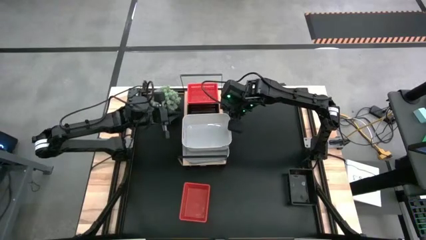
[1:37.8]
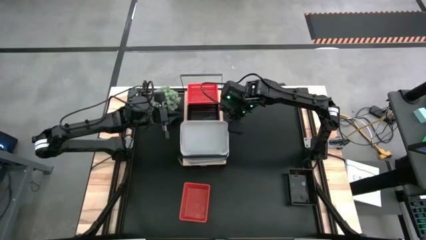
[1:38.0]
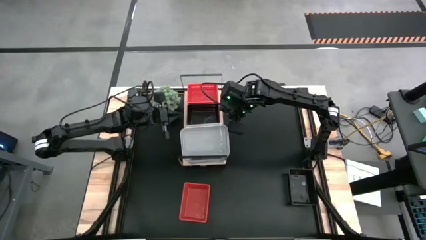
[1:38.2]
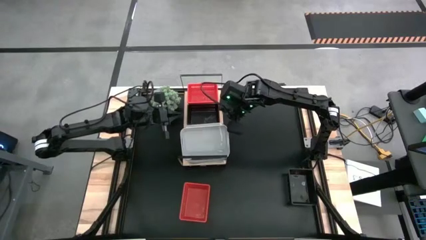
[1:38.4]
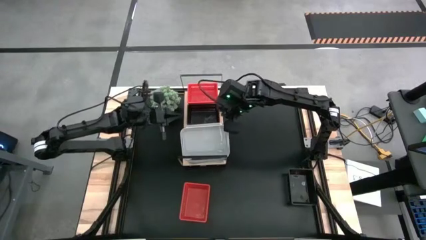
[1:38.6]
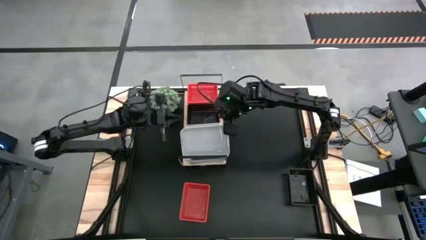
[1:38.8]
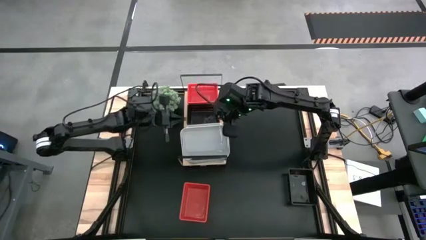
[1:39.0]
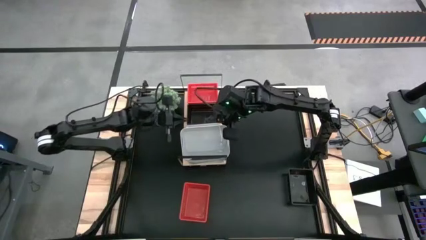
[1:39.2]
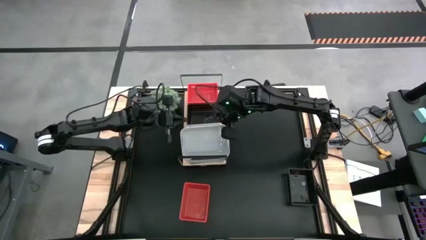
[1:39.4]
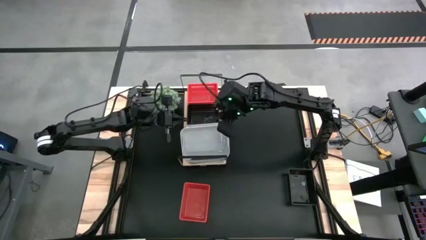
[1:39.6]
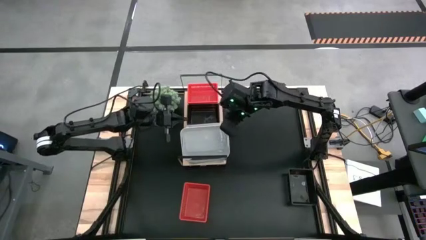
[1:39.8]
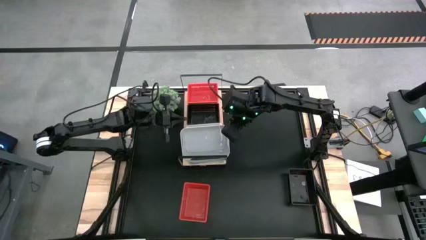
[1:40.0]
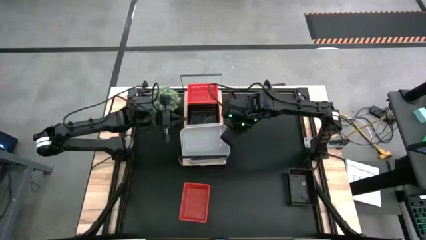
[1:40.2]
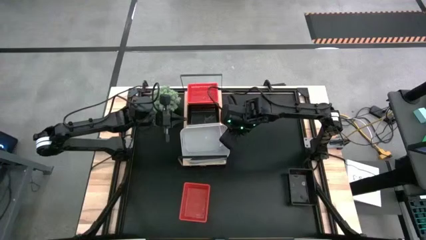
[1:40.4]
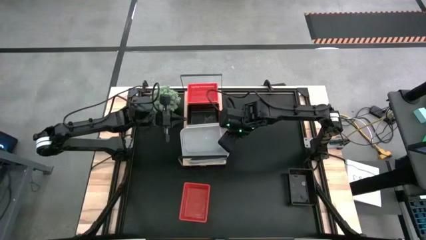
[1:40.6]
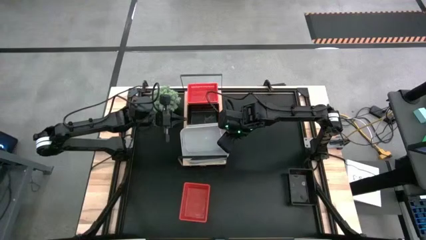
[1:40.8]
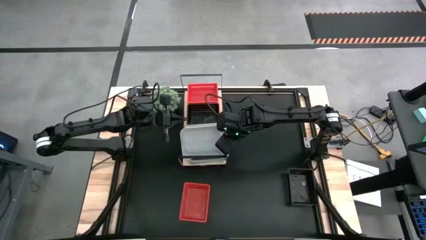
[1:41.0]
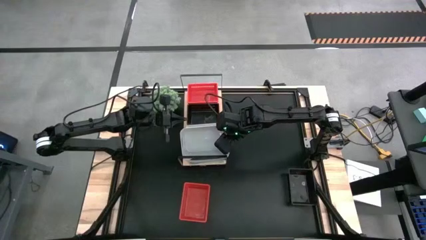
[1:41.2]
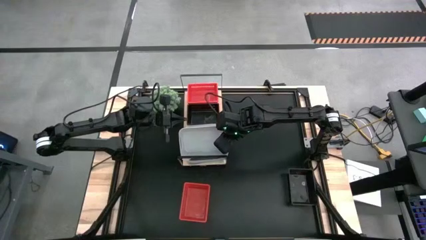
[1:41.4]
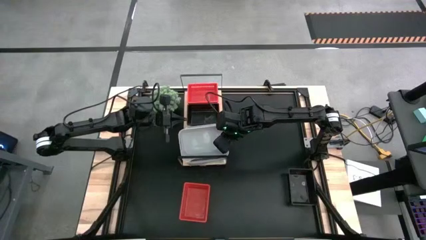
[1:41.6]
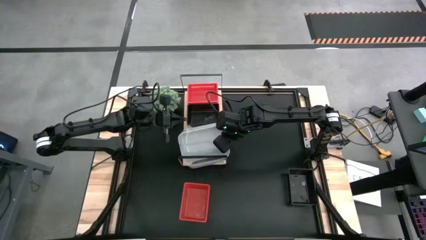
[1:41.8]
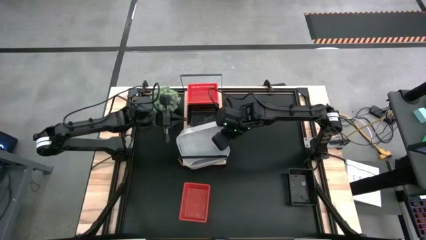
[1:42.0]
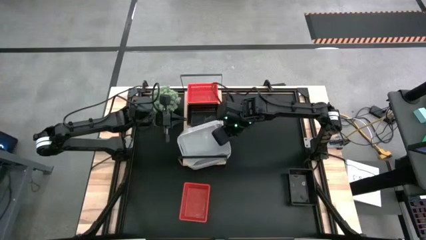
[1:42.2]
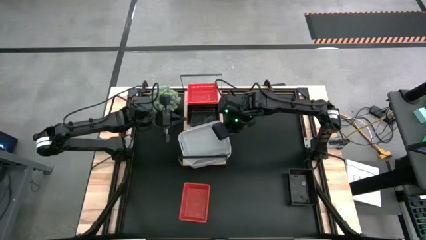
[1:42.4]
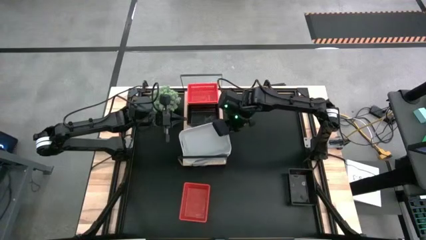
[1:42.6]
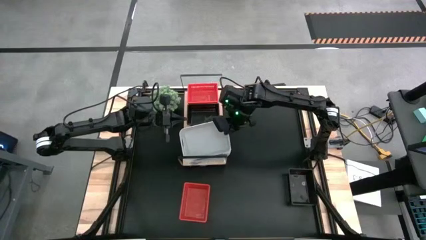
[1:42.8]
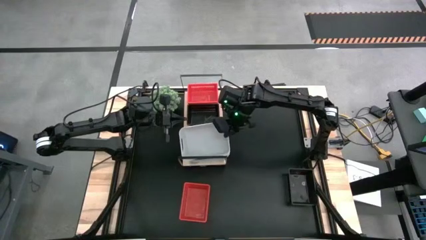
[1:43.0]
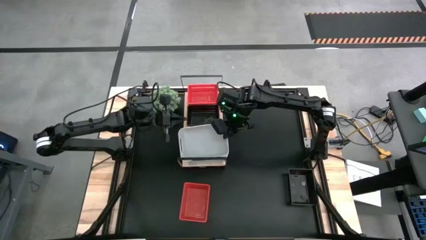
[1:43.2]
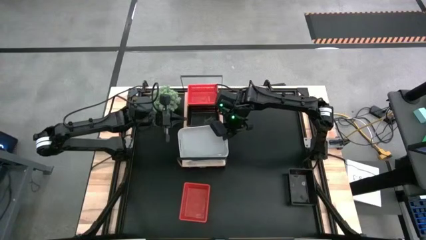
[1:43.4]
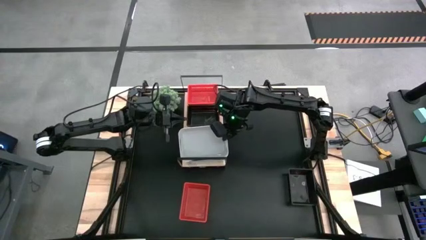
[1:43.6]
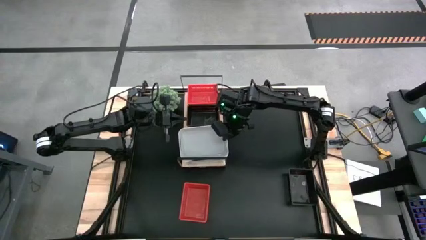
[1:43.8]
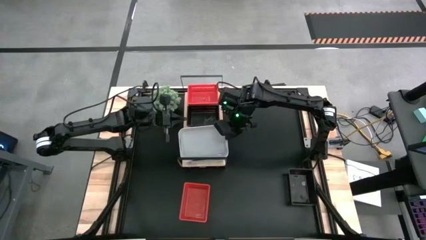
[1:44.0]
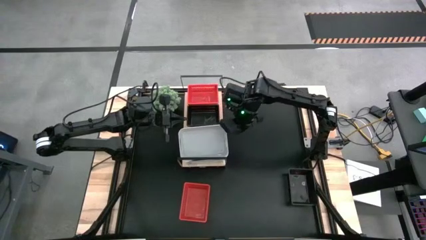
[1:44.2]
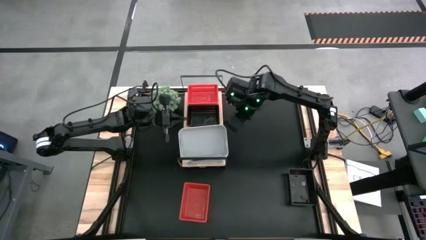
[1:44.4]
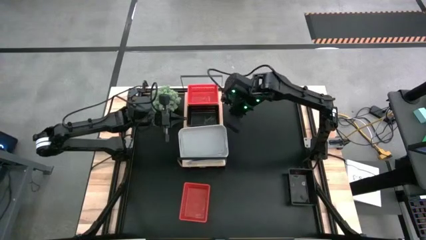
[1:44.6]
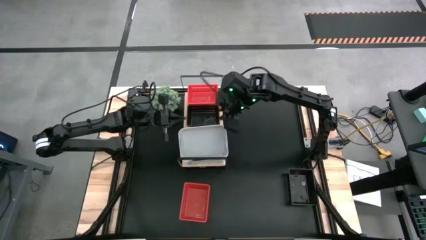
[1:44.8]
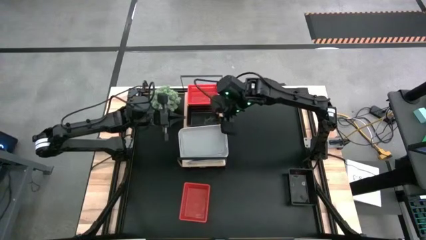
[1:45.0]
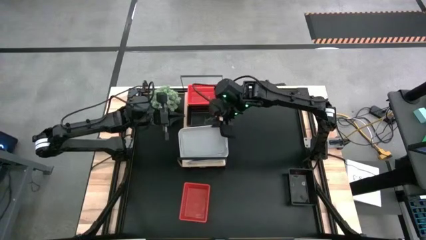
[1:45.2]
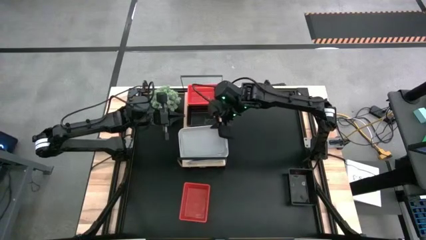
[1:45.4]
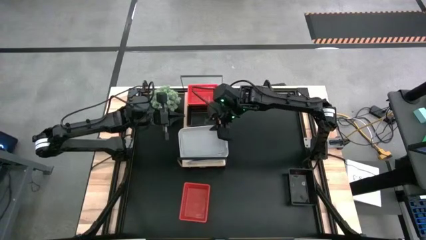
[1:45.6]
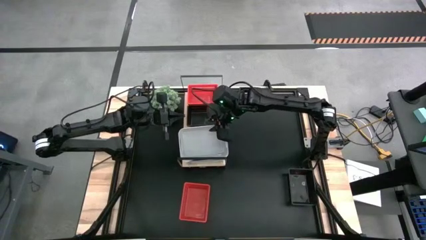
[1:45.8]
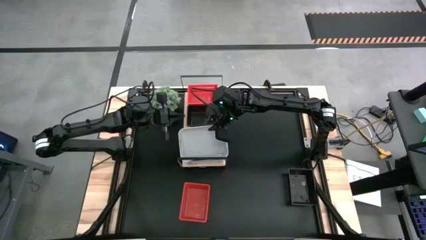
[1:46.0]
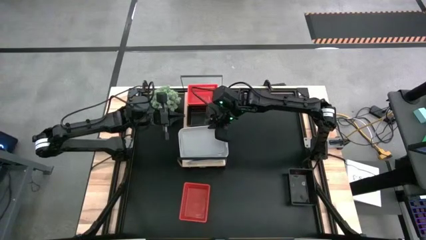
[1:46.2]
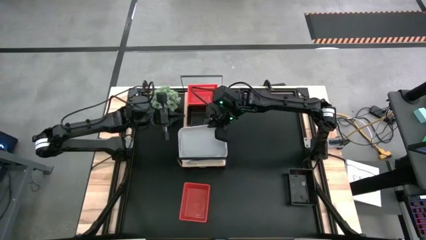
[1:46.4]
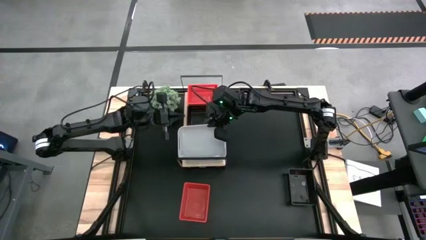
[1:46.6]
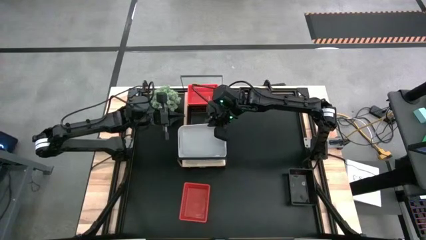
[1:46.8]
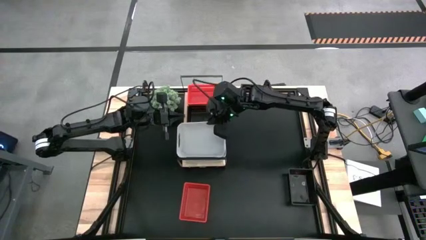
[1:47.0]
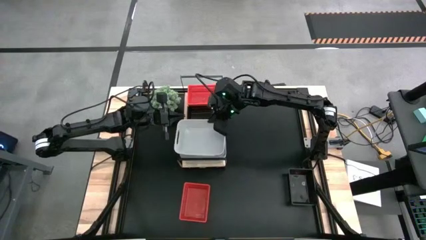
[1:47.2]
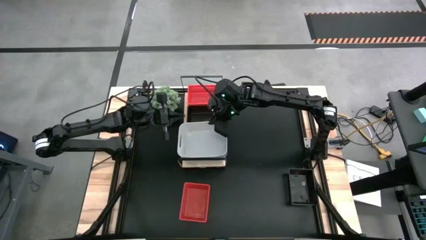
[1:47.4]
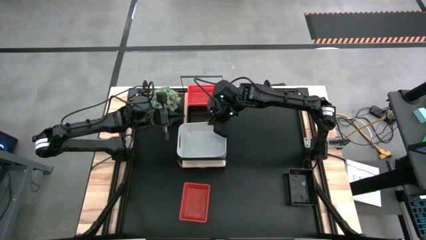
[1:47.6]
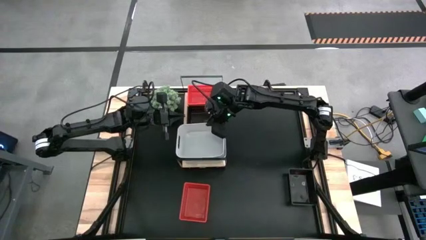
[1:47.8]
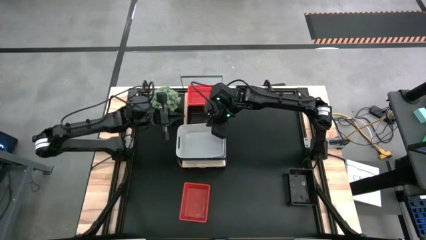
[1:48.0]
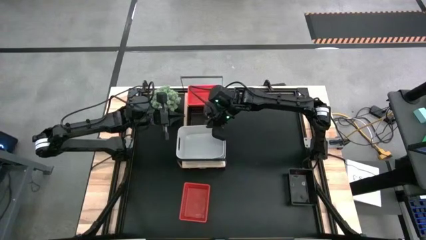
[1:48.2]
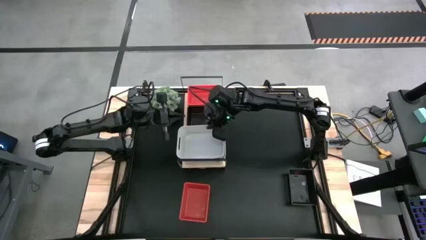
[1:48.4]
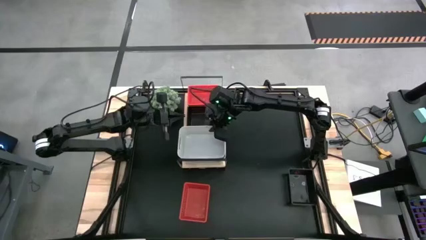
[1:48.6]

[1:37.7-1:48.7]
Task: Stack baskets on shelf by color
Stack the gray bin on top of the gray bin on the shelf

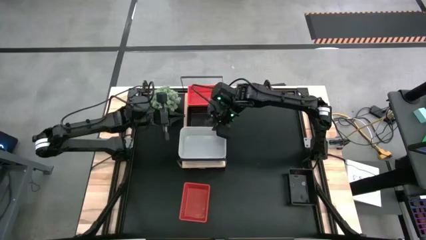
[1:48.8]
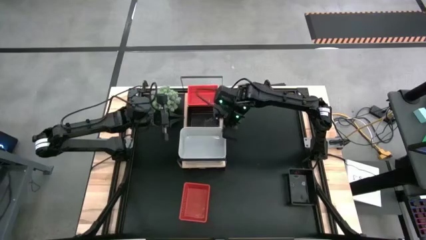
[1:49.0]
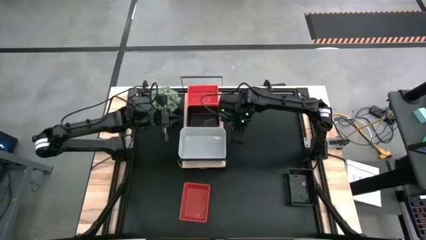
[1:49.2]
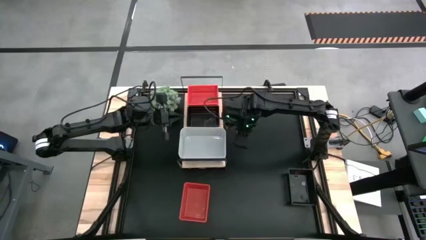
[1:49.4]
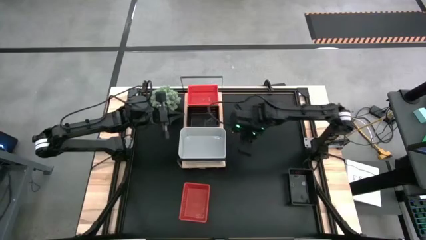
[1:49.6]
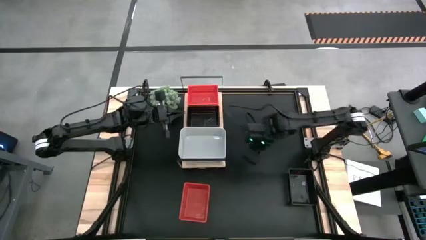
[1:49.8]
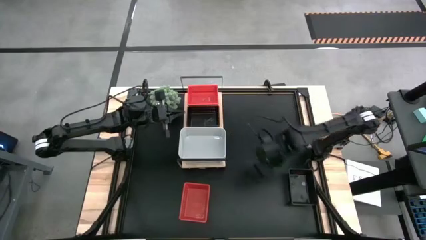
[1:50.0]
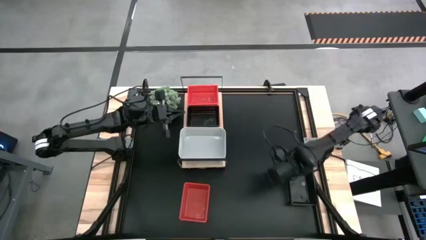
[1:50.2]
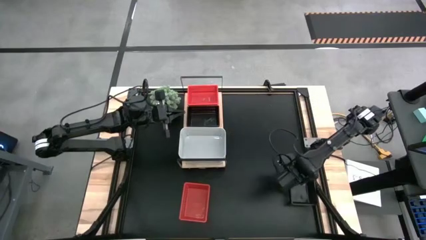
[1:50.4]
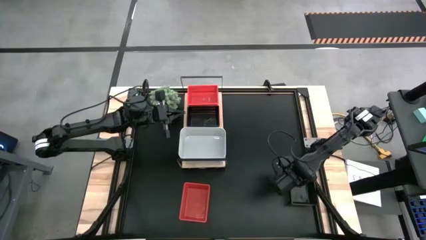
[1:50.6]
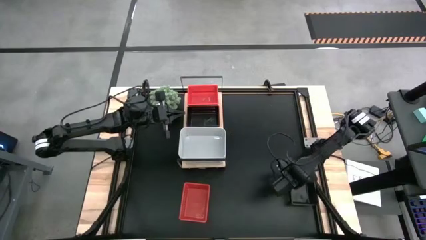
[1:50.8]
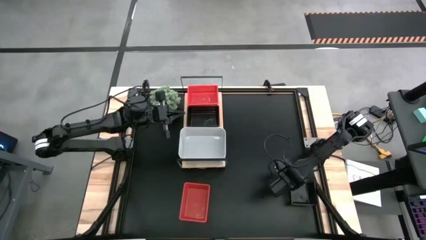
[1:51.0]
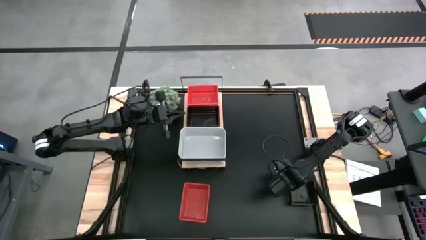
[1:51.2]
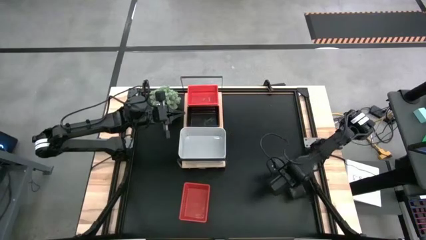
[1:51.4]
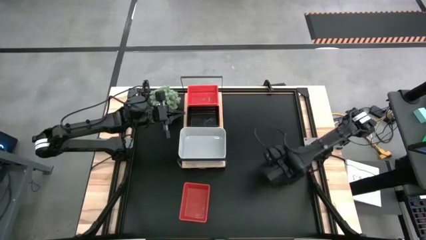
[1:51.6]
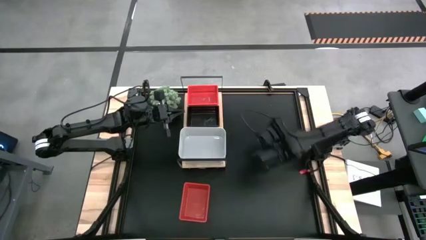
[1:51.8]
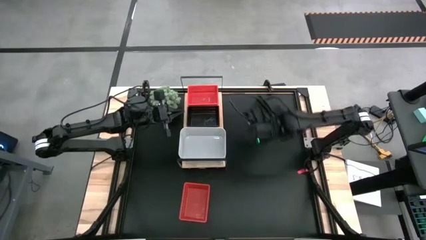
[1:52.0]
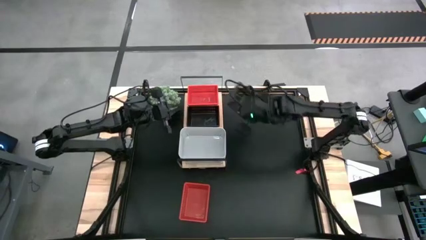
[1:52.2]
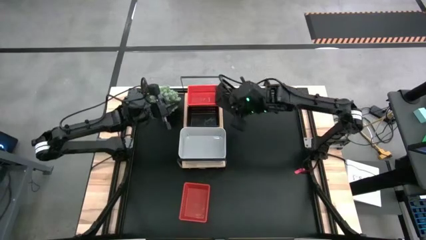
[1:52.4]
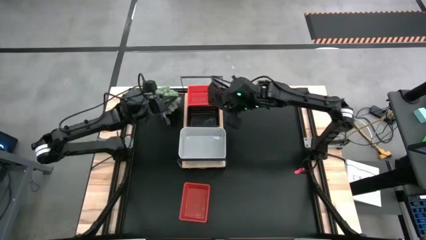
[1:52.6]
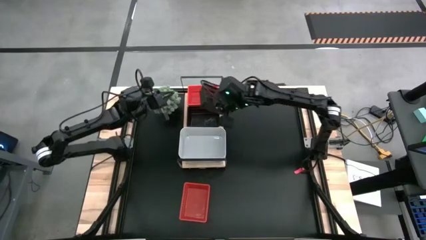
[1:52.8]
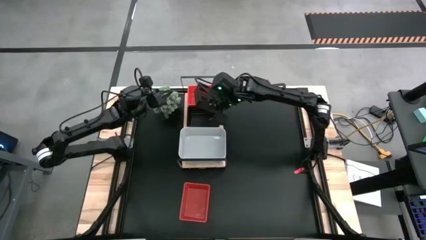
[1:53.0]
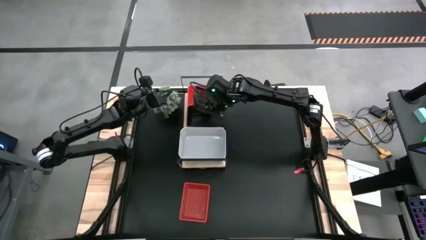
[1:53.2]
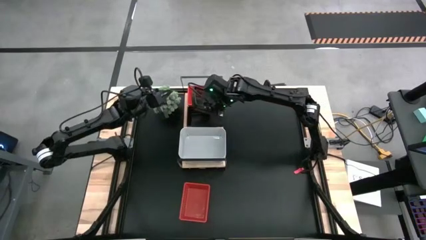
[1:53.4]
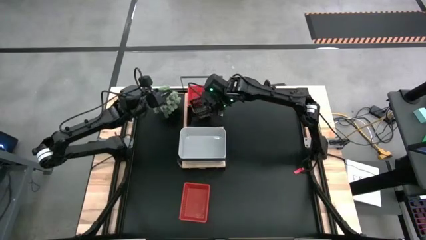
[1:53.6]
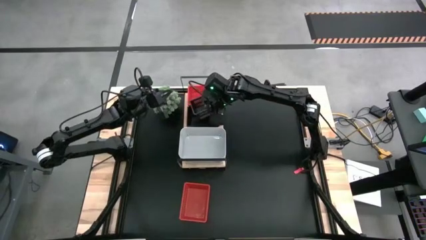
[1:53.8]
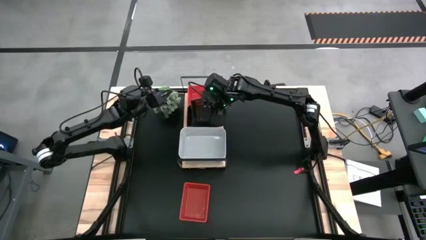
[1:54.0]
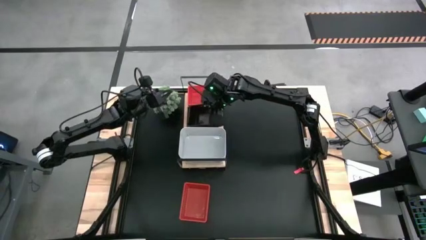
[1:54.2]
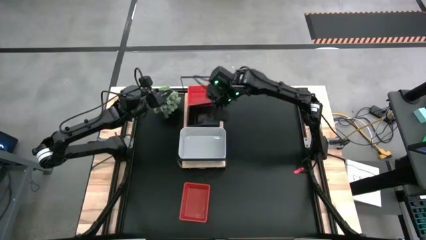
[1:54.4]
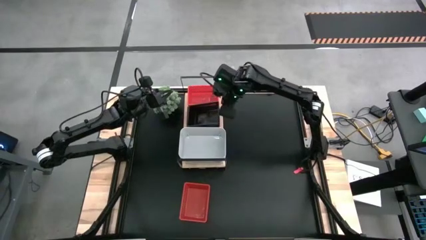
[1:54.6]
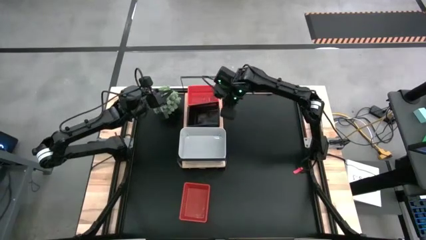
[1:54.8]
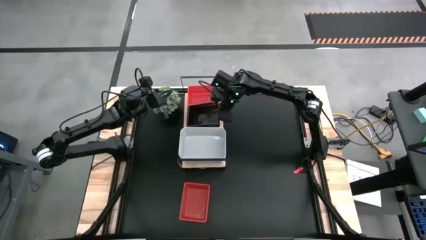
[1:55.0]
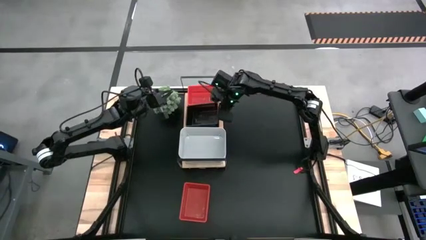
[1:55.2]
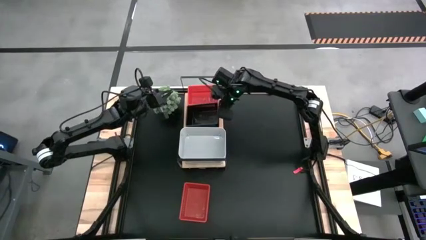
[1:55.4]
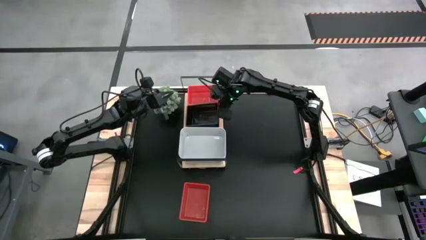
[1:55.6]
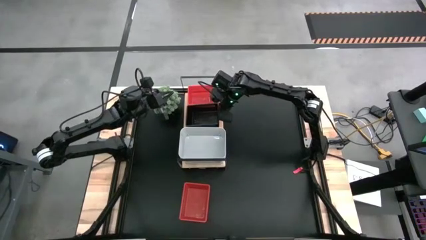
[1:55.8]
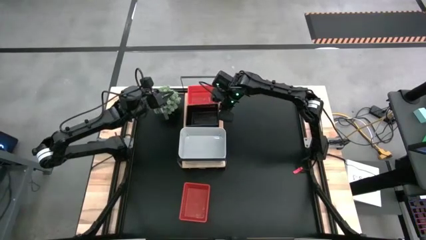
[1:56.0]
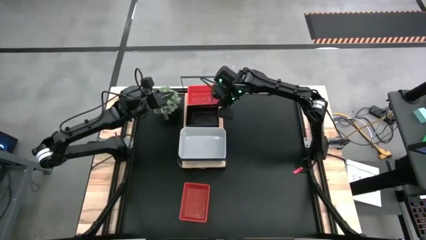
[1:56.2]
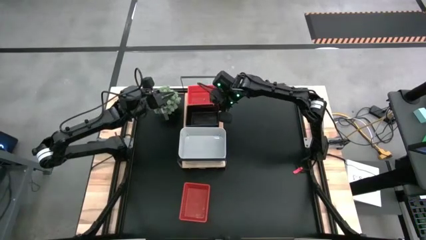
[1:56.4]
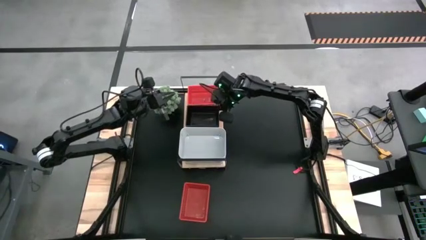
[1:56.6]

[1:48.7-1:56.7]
Stack the black bin on top of the other black bin on the shelf
